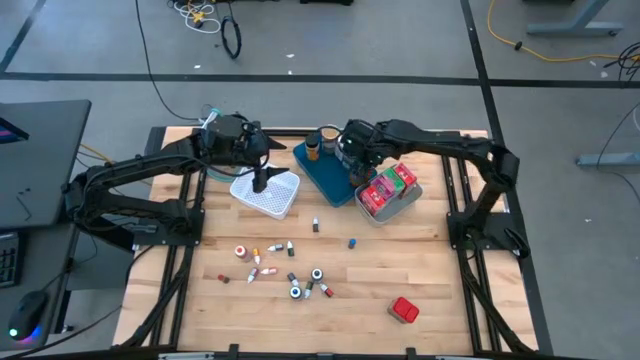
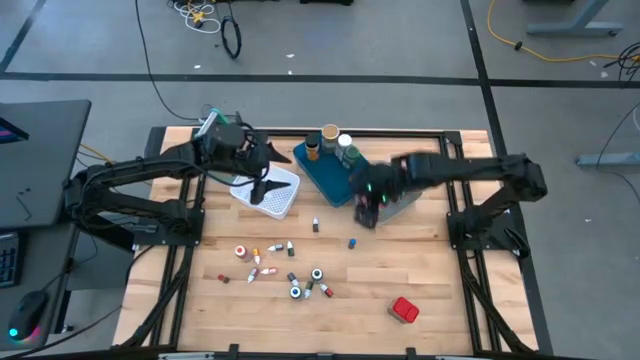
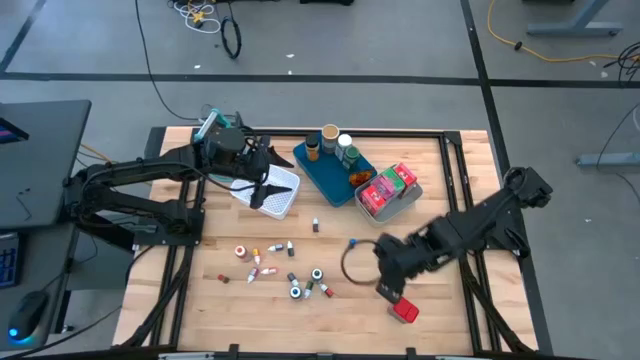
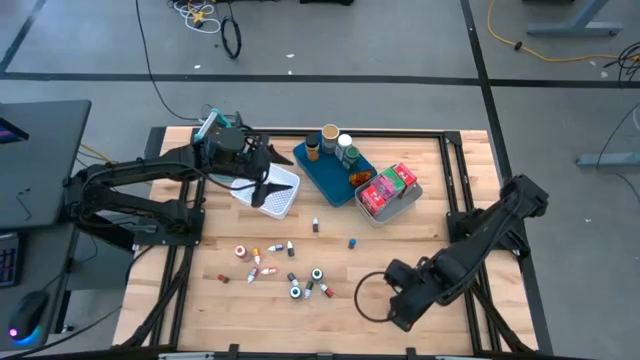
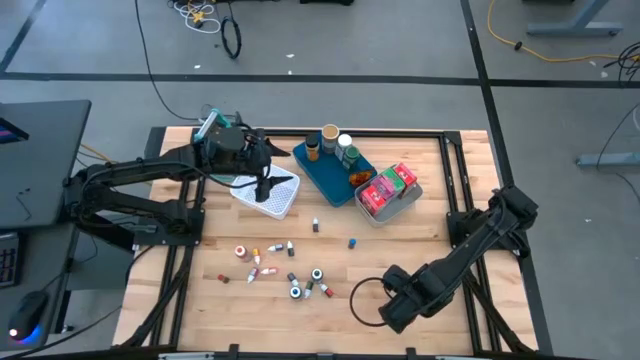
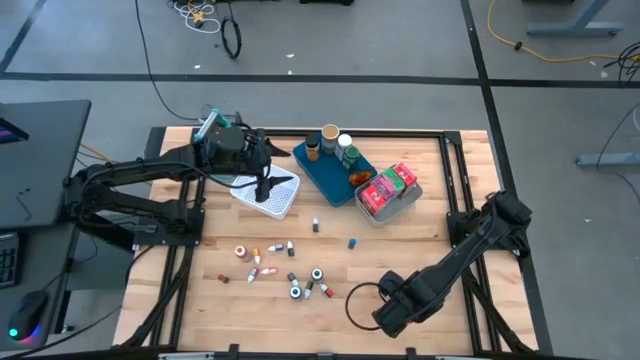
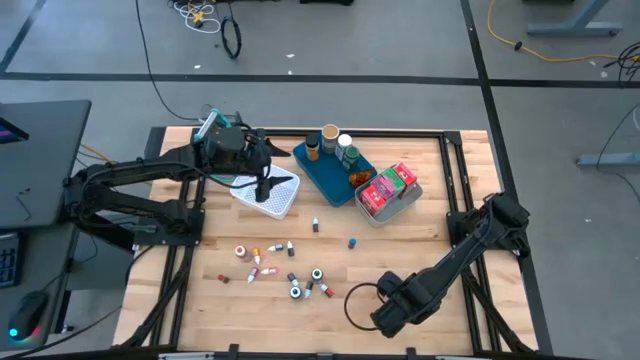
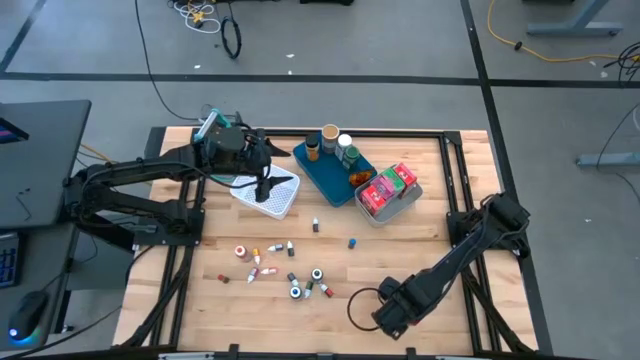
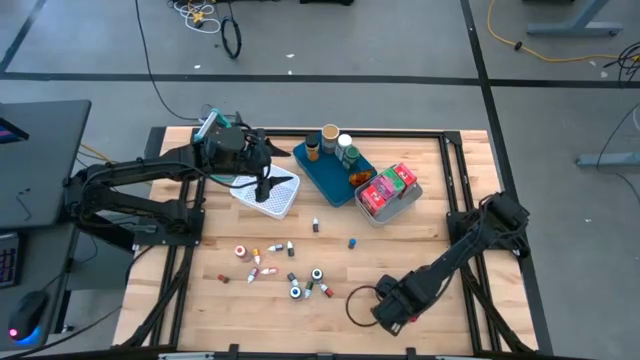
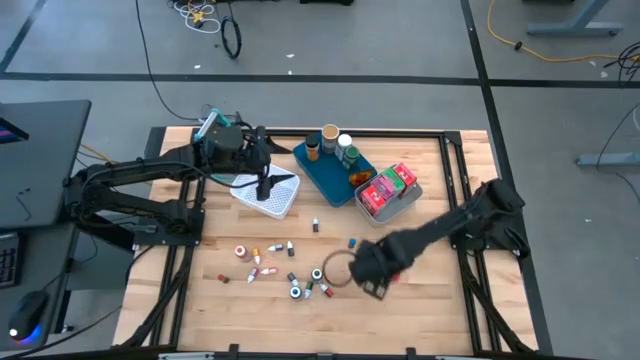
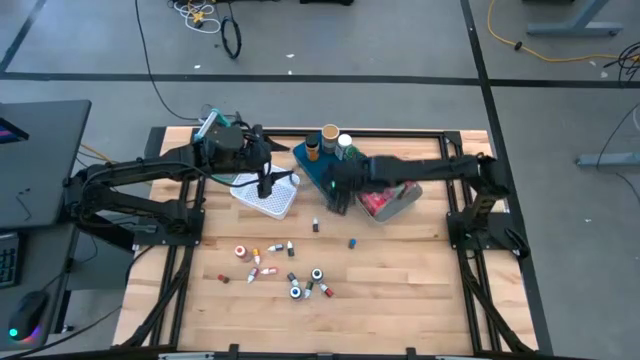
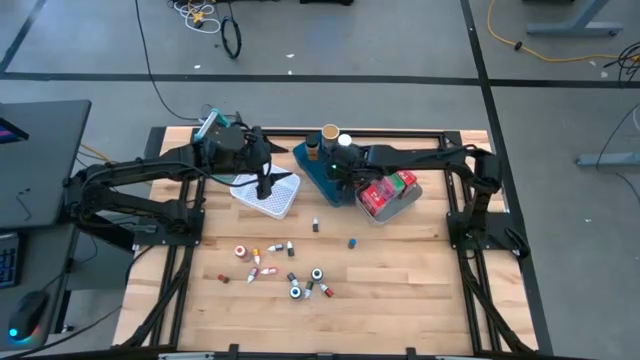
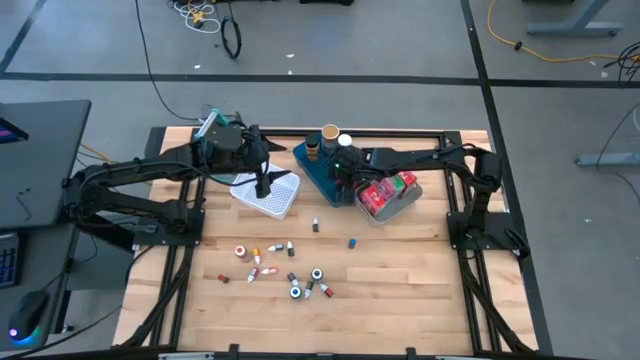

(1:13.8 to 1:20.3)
Task: Pick & Place Kitchen Items
Put the red seasoning can into the blue bin

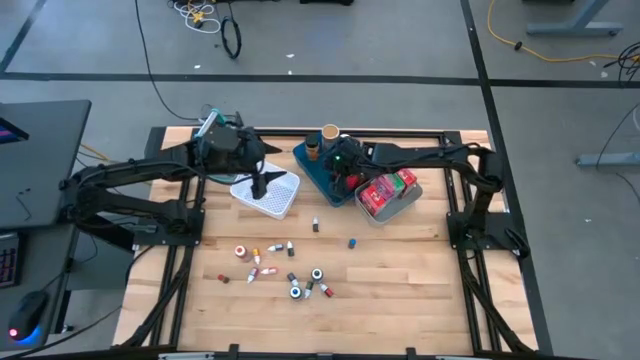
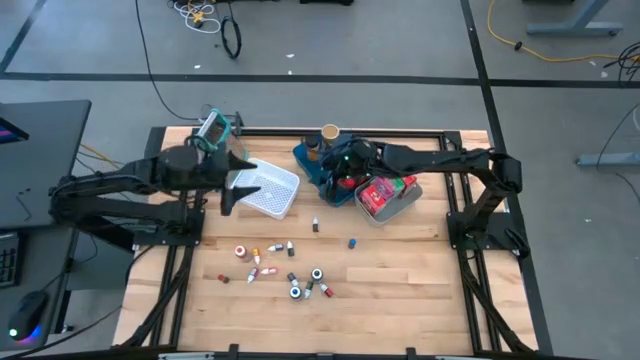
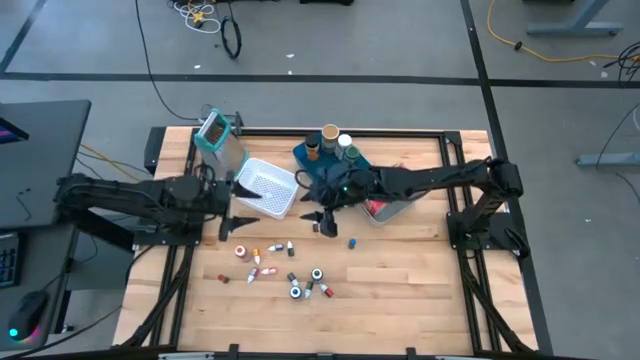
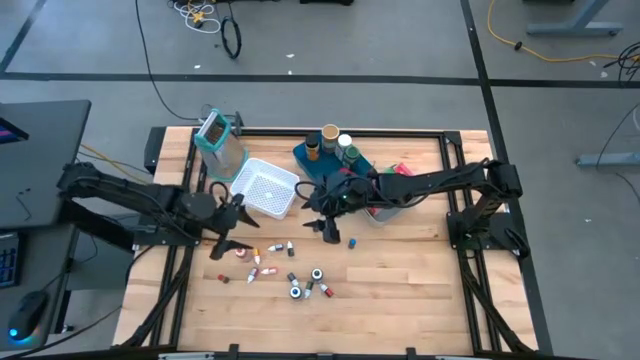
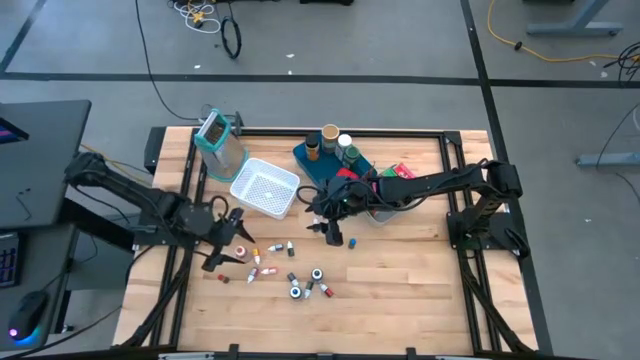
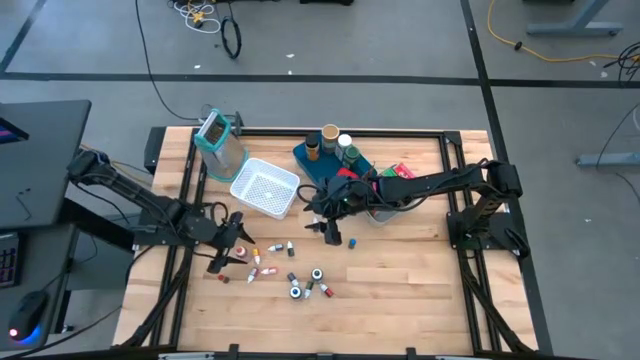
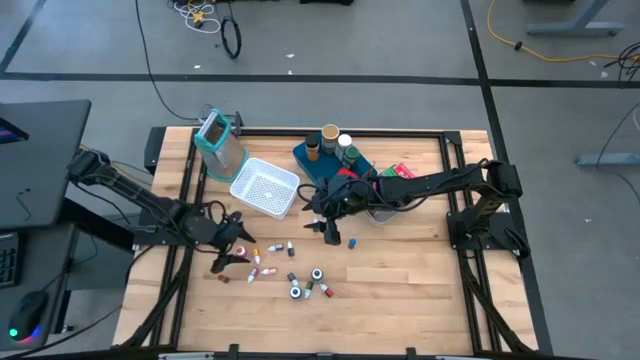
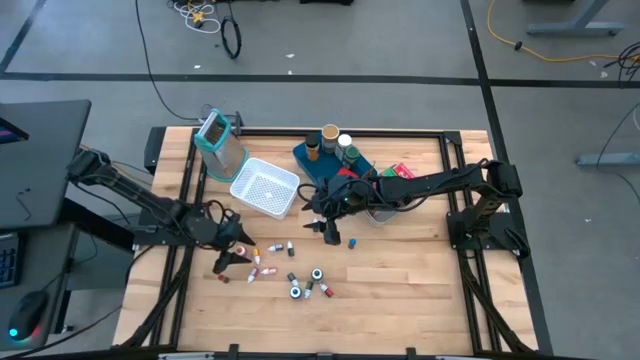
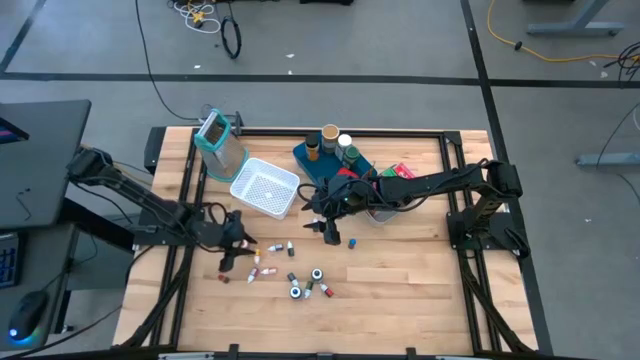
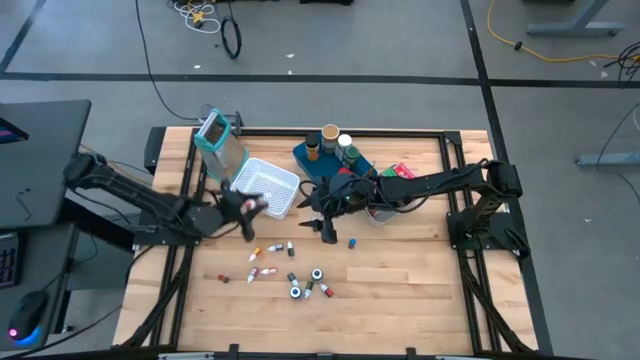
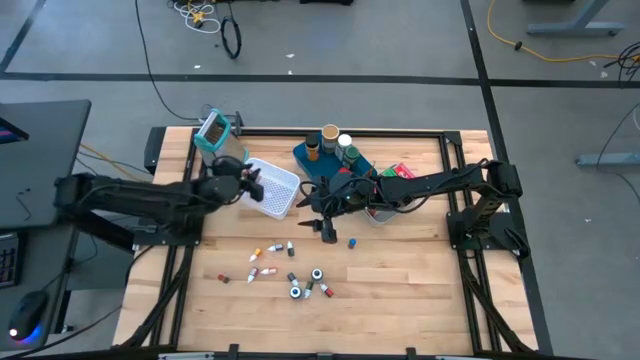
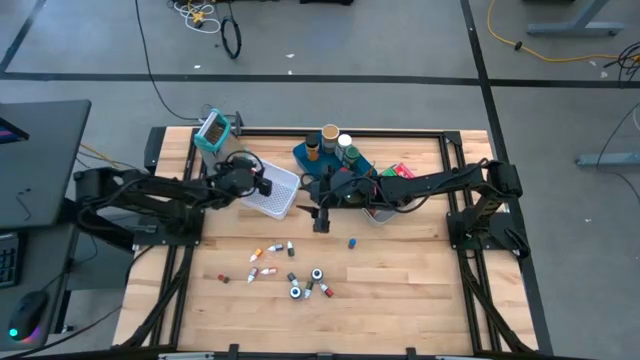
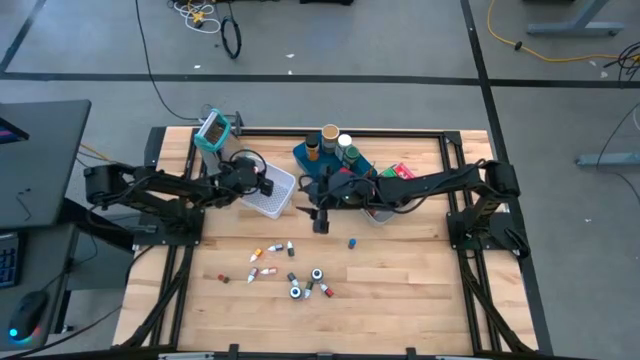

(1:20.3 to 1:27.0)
Put the orange food coloring bottle into the white bin

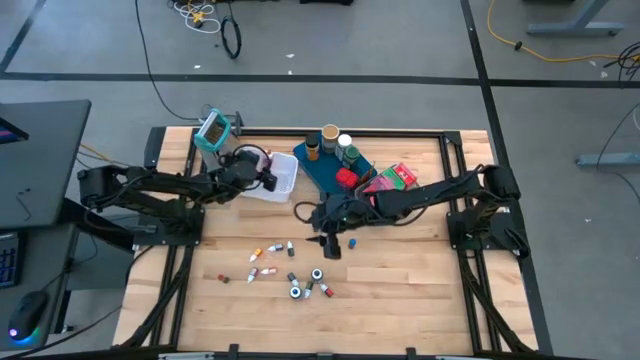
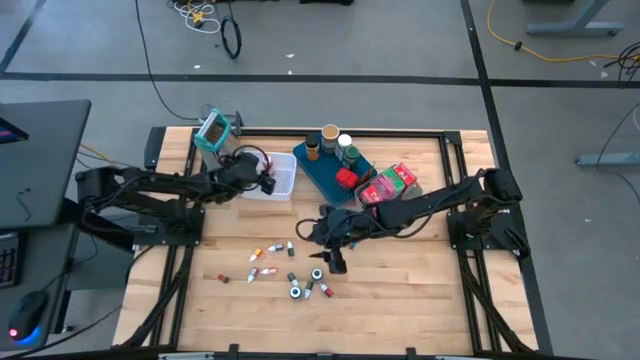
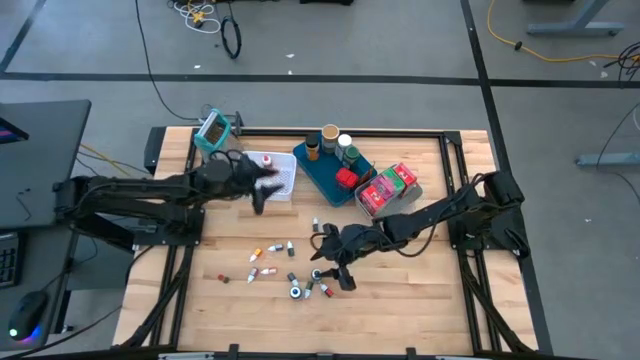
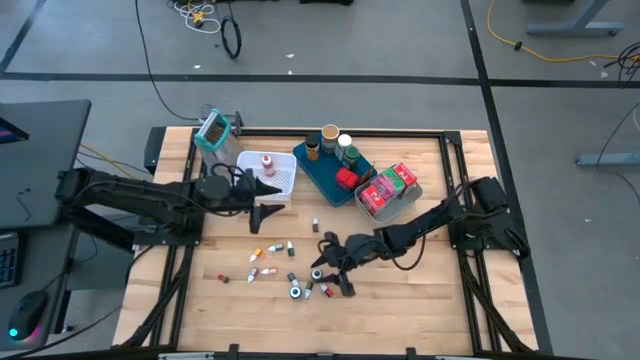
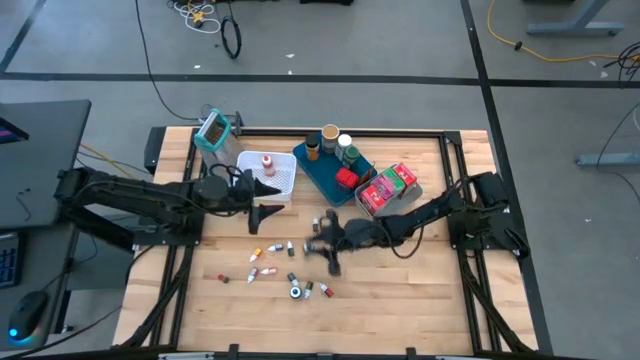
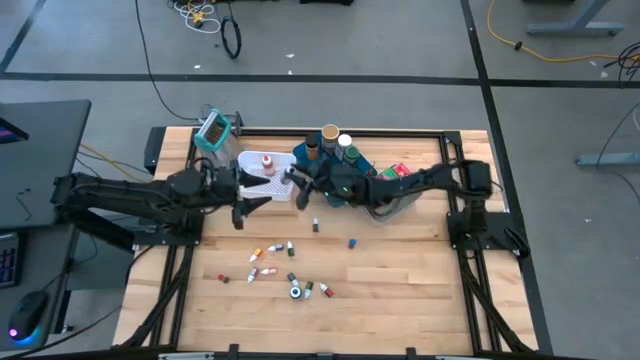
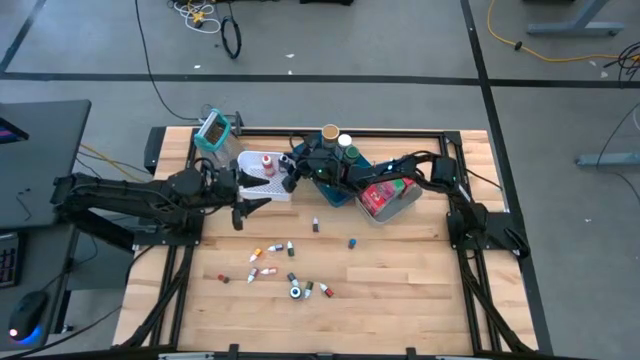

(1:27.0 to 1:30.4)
Put the black food coloring bottle into the white bin

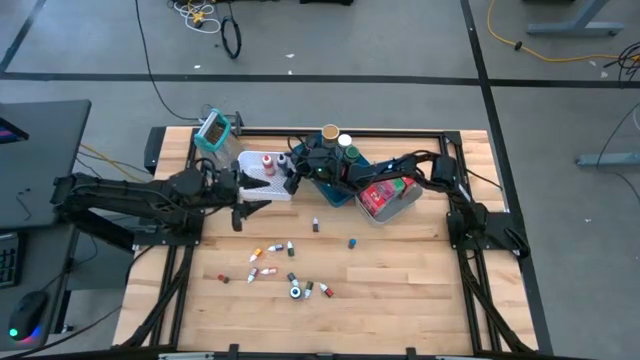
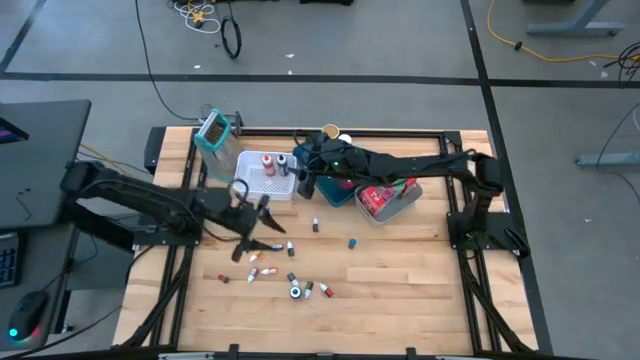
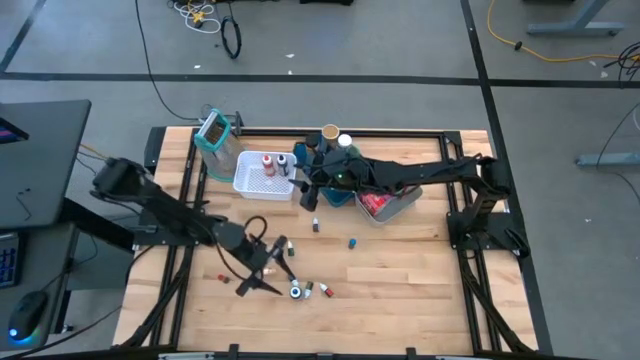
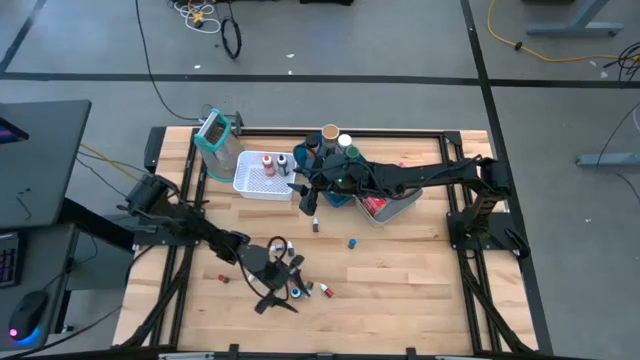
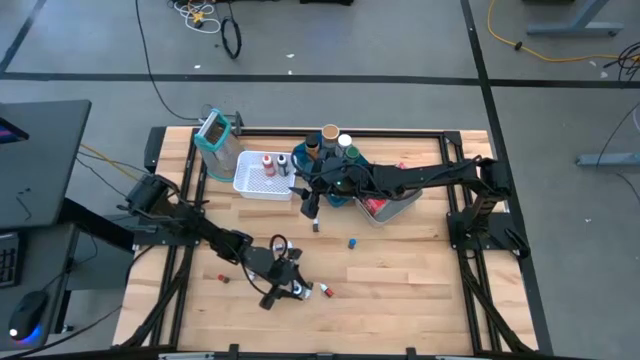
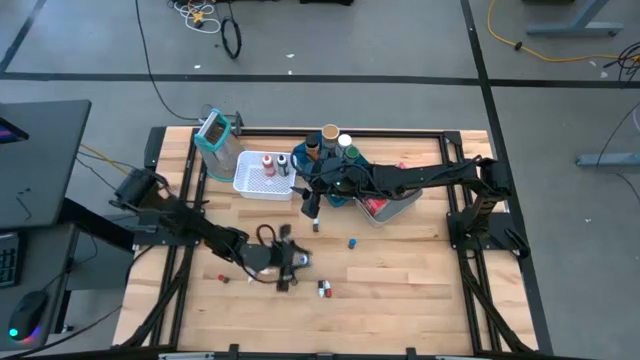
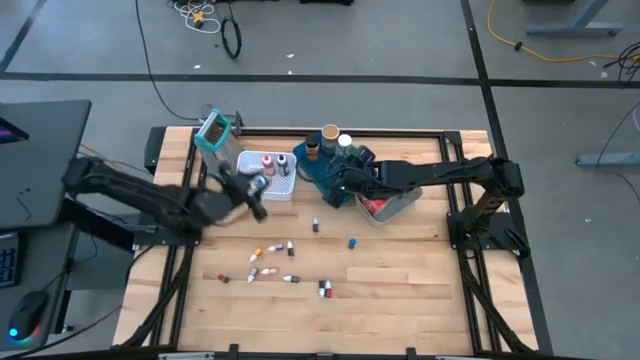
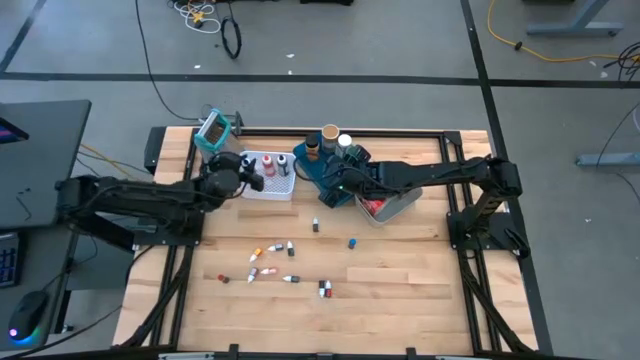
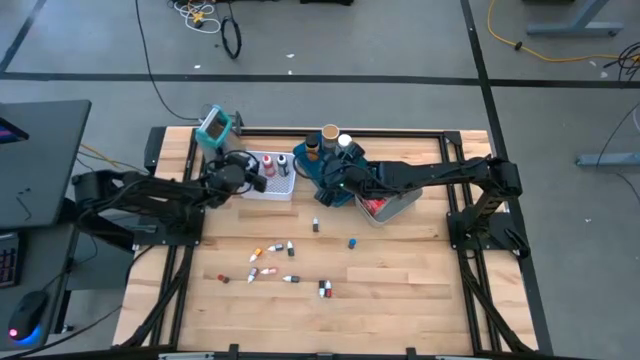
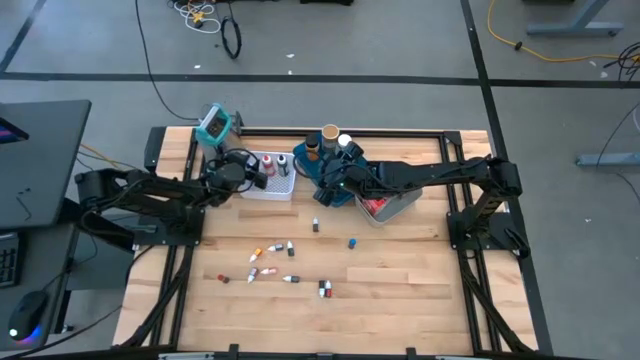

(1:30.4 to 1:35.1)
Put the blue food coloring bottle into the white bin

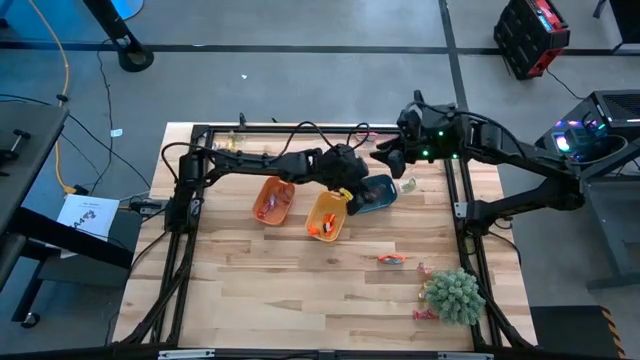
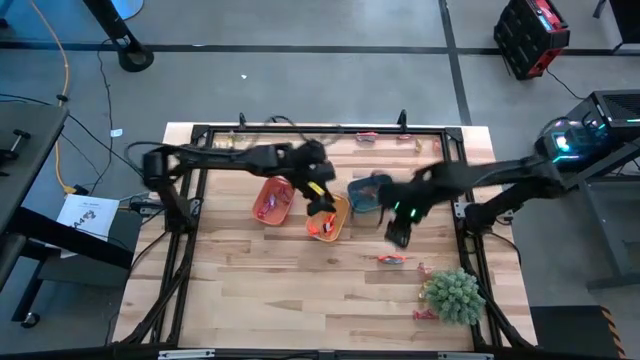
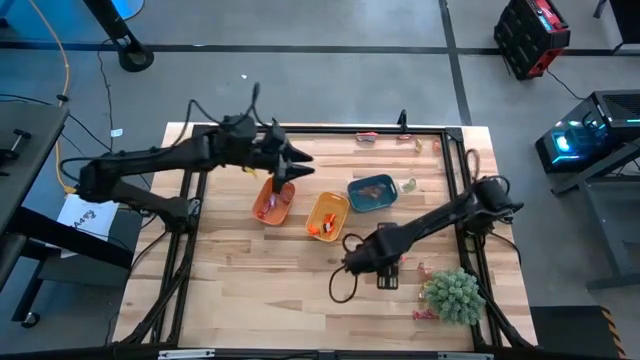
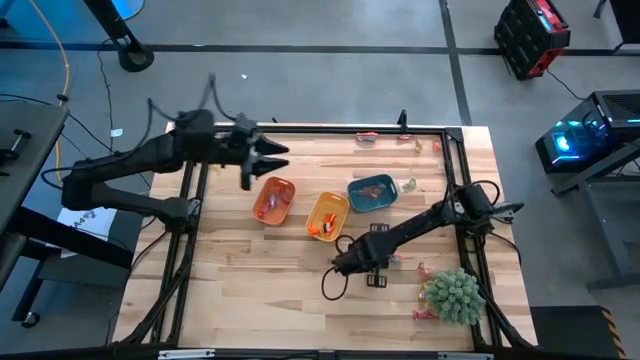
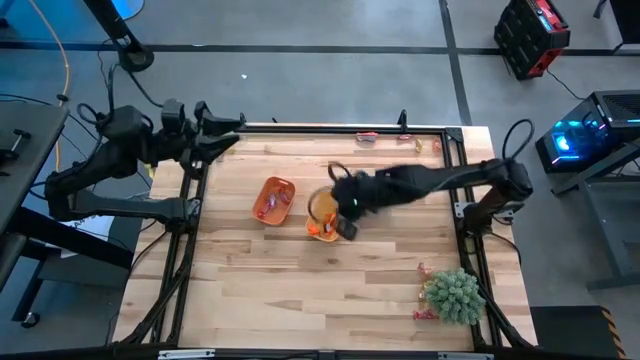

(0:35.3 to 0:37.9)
Task: Sort candy
Put the orange chocolate into the yellow bin
